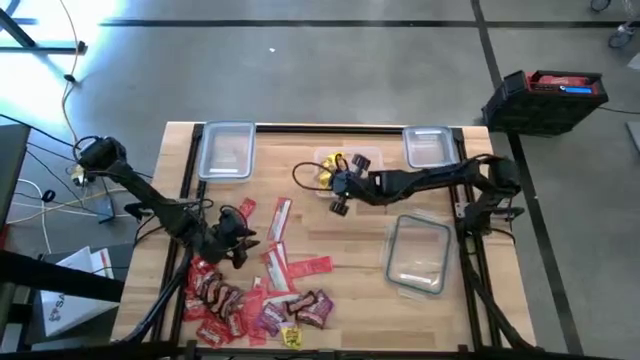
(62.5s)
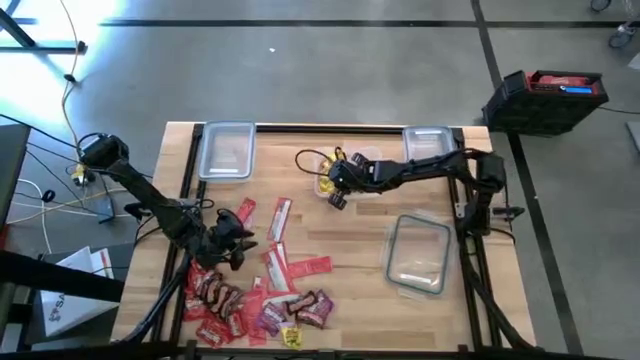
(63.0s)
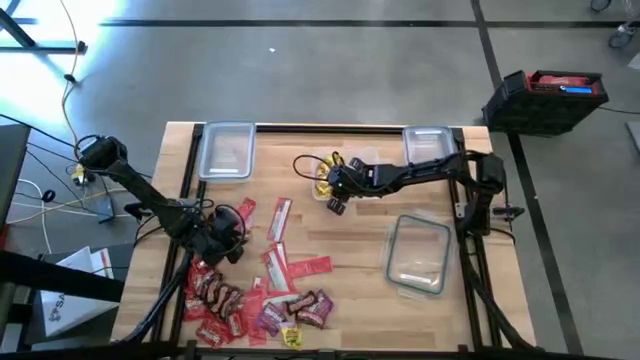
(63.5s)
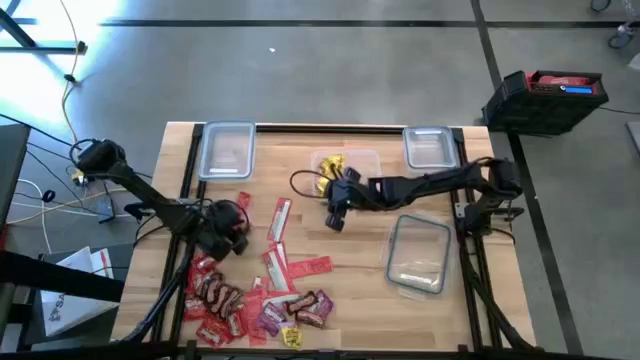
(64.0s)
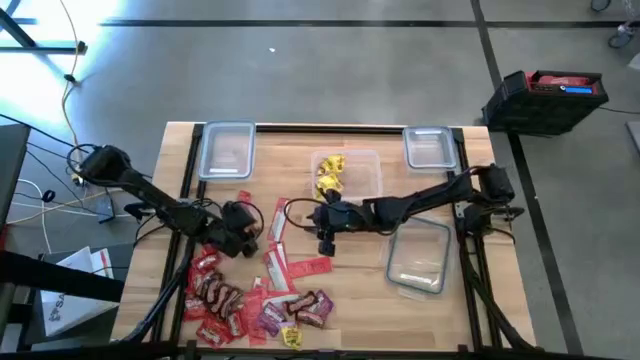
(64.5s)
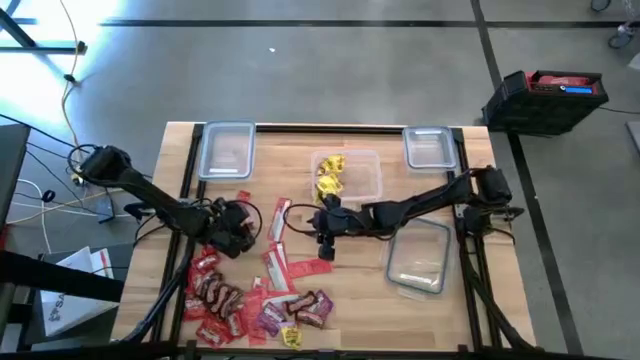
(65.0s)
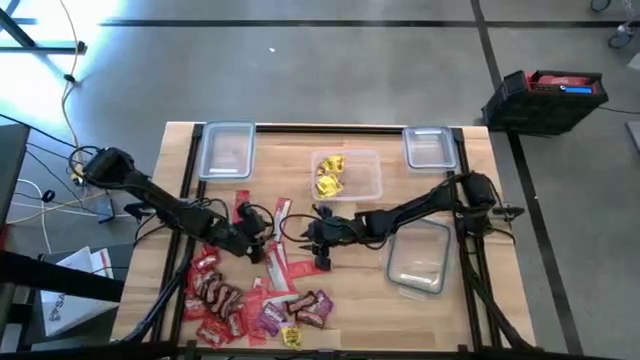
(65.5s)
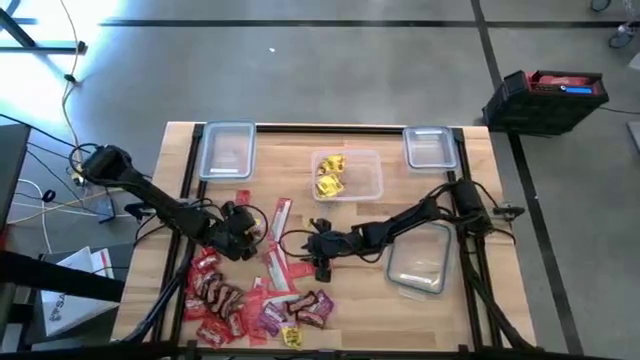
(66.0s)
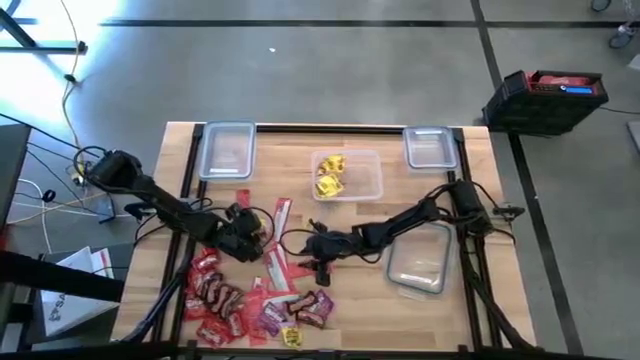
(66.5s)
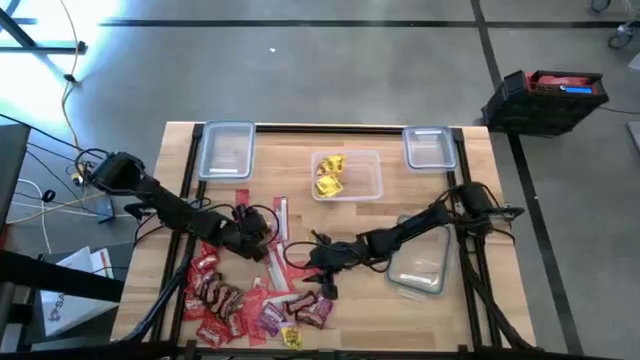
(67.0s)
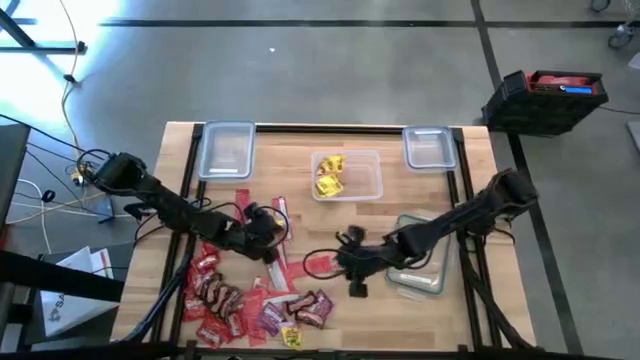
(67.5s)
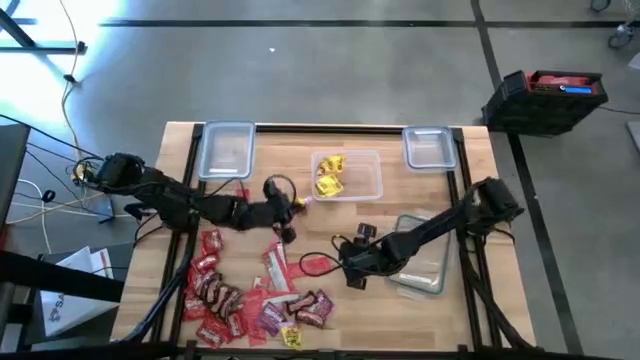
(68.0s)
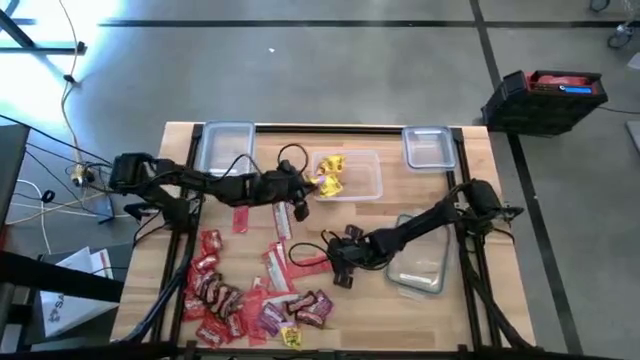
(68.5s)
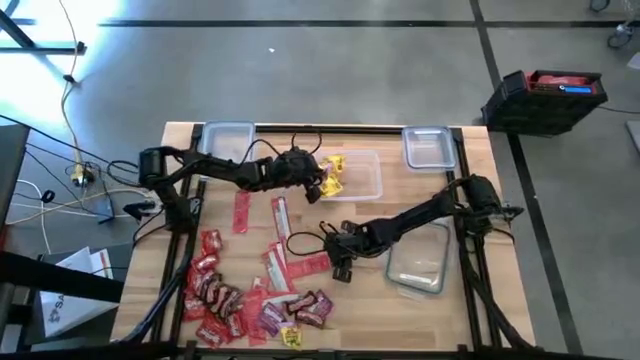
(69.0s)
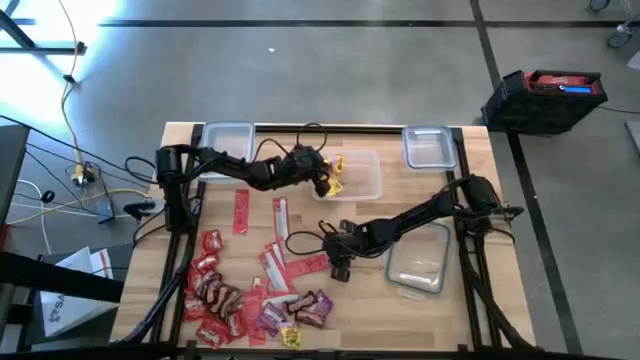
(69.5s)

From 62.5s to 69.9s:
Task: Sort candy
Put the middle left yellow candy into the center transparent bin

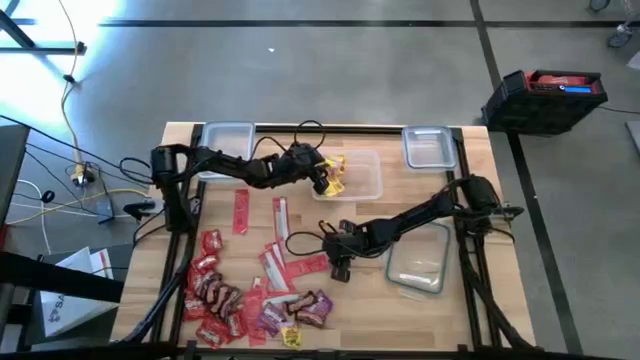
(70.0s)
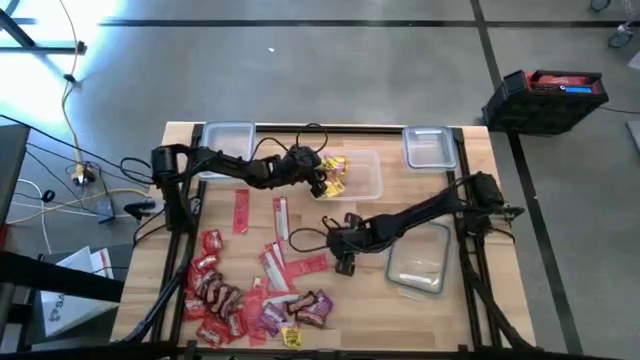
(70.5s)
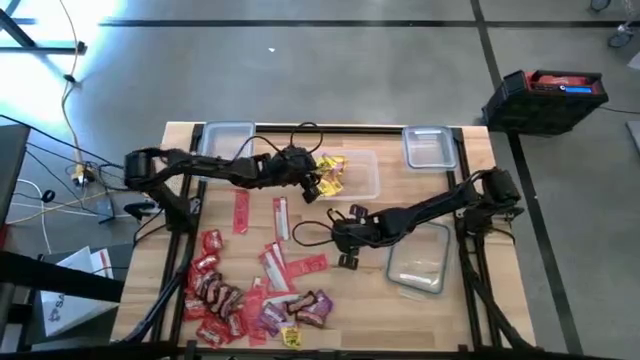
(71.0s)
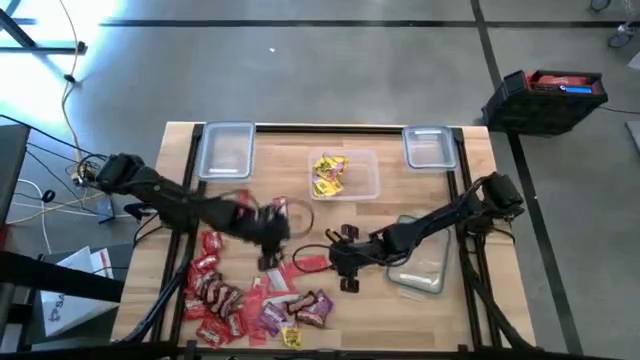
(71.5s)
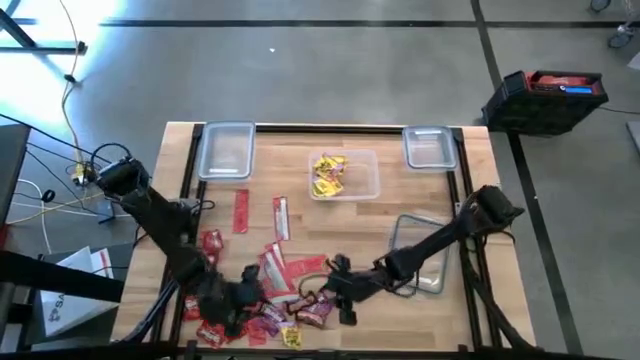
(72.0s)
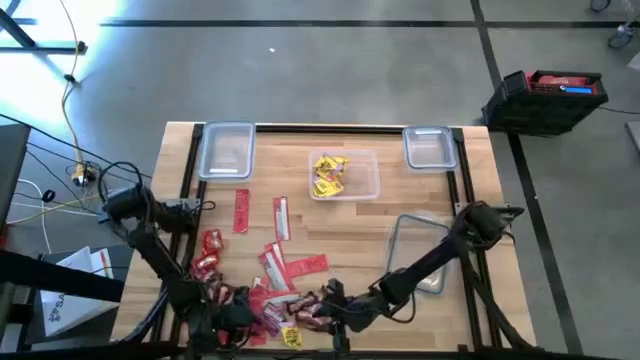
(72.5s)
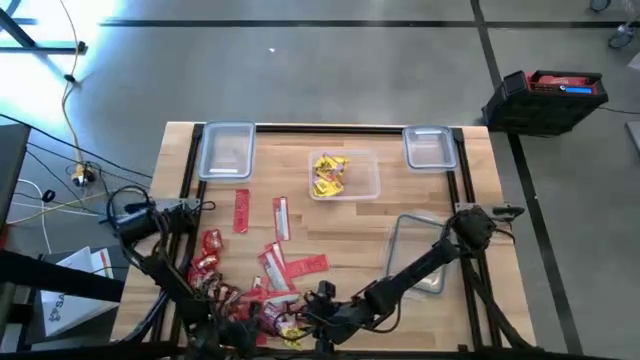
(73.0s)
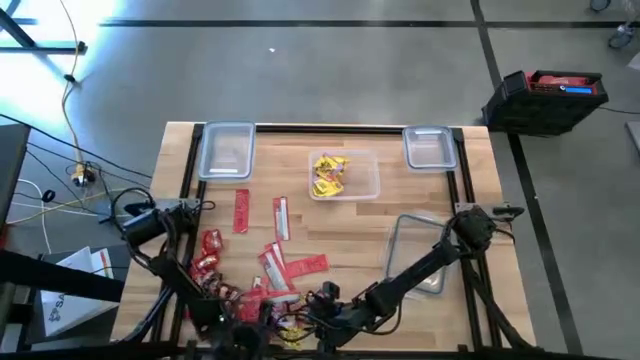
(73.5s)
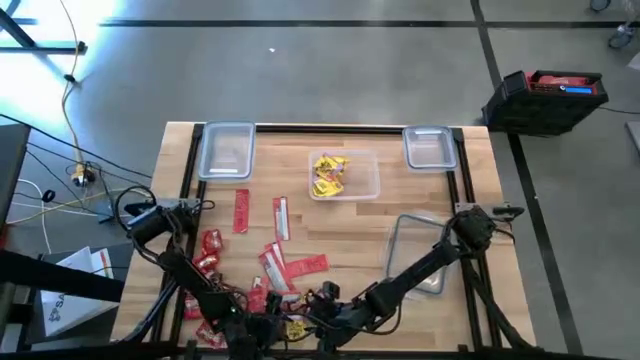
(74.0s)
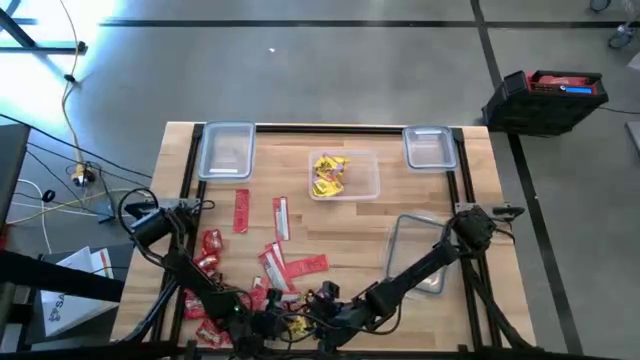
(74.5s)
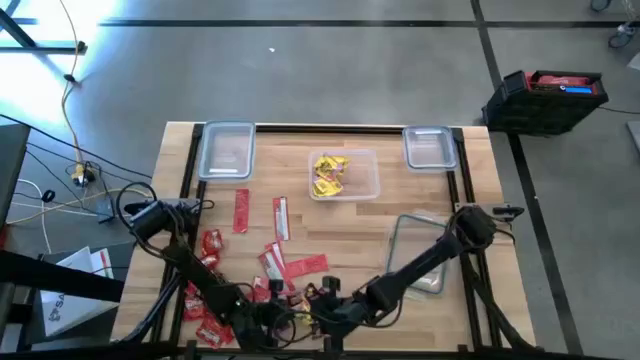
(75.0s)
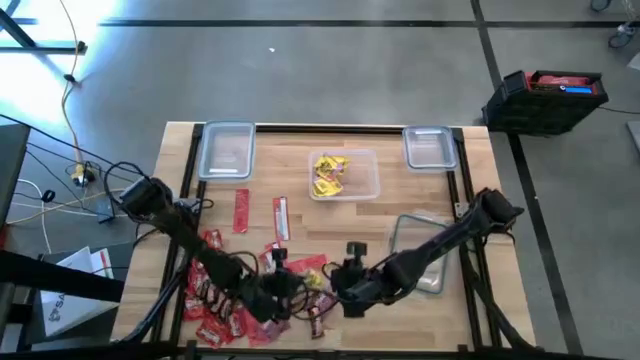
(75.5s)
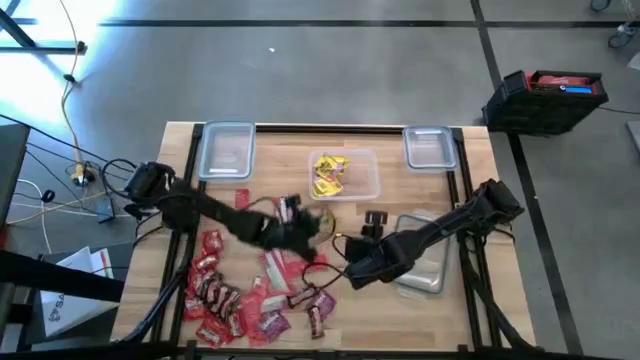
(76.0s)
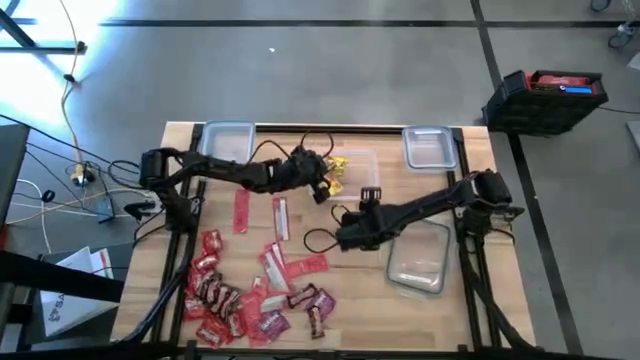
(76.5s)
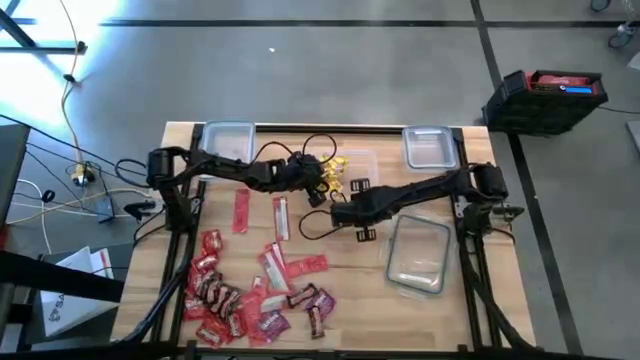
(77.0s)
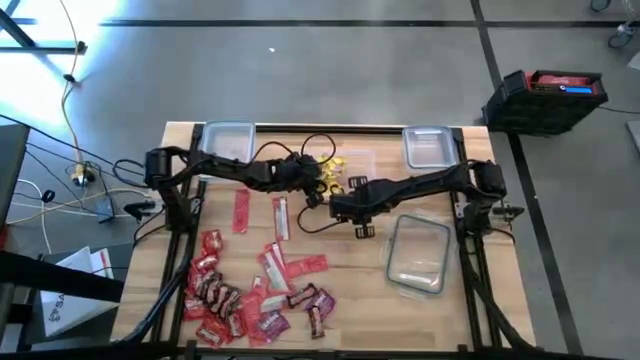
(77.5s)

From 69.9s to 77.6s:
Put the yellow candy into the center transparent bin

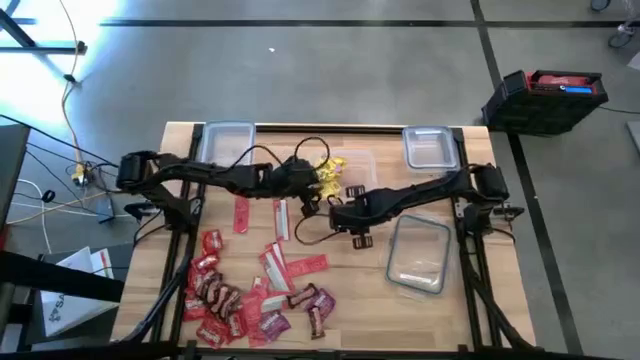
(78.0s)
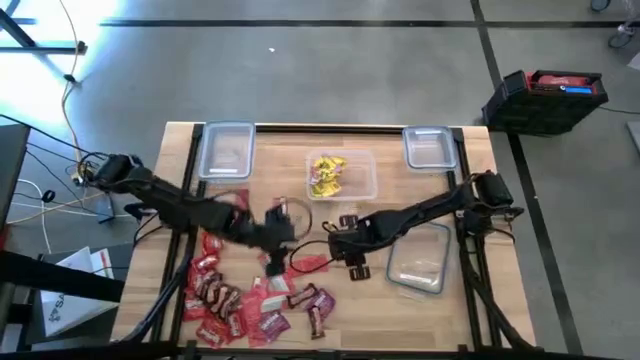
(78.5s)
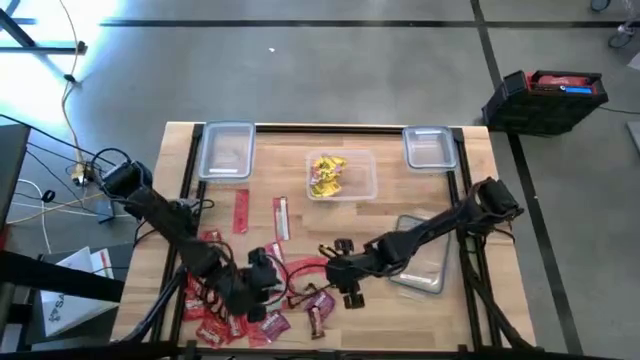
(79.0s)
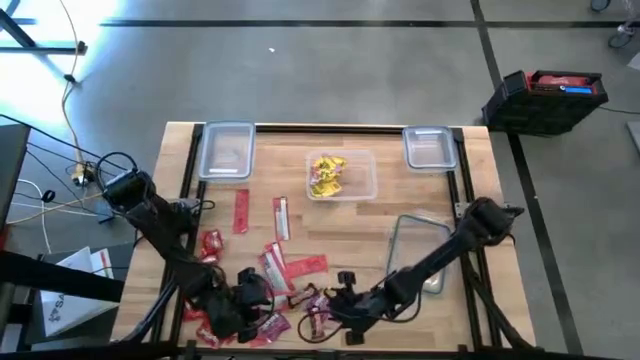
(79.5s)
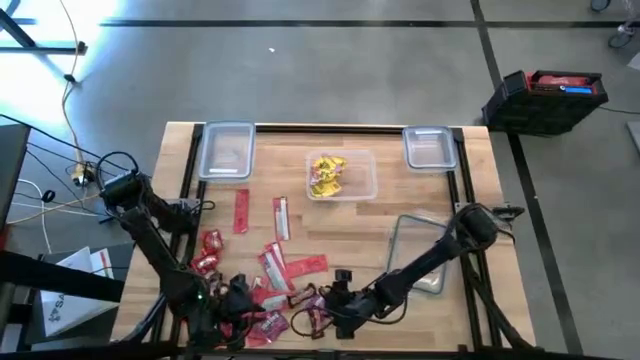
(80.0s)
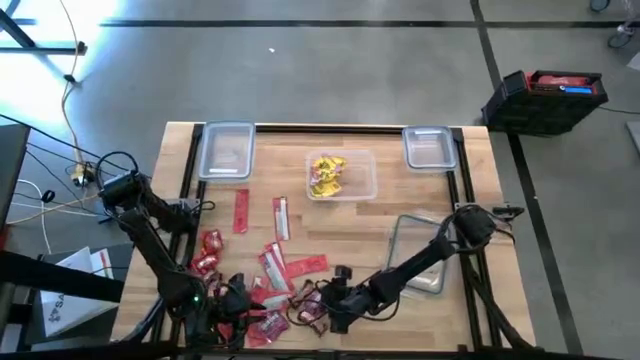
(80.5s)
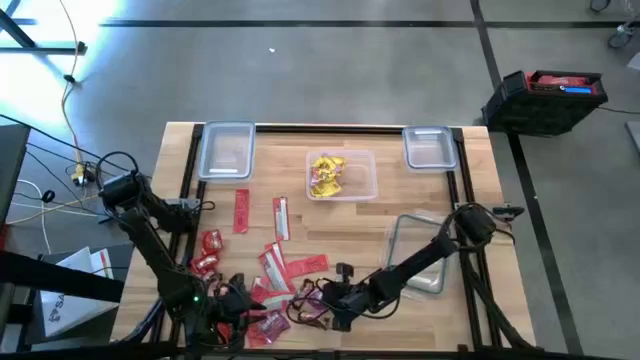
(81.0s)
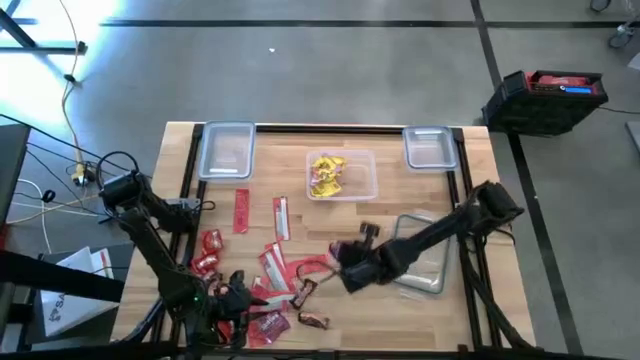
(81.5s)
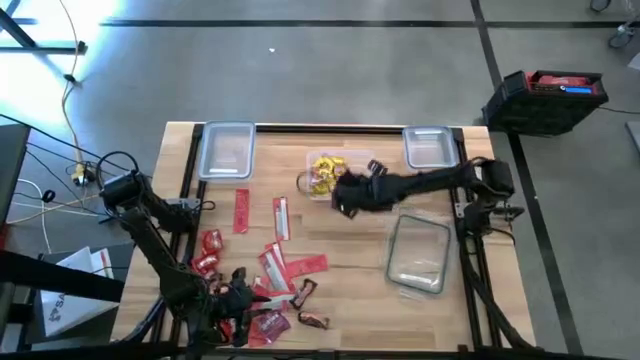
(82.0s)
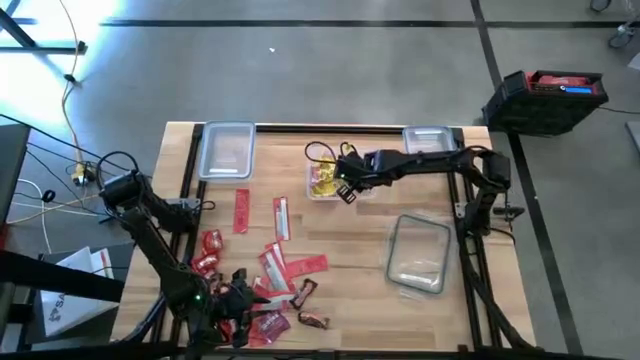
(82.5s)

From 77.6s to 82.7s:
Put the violet candy into the center transparent bin

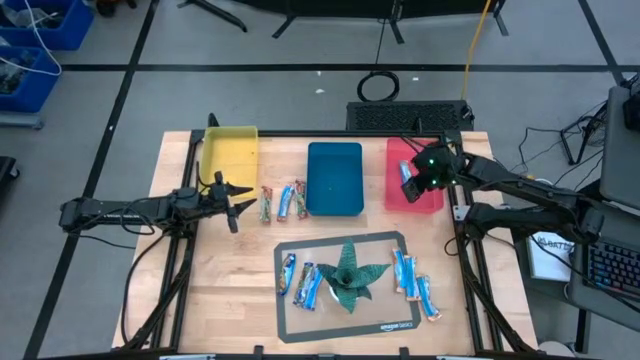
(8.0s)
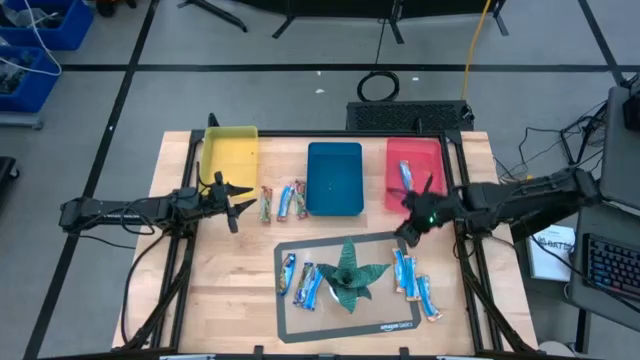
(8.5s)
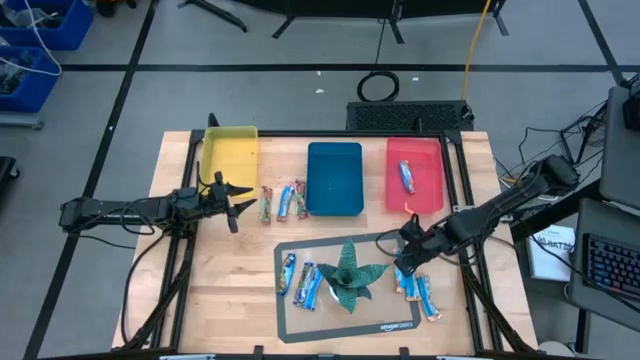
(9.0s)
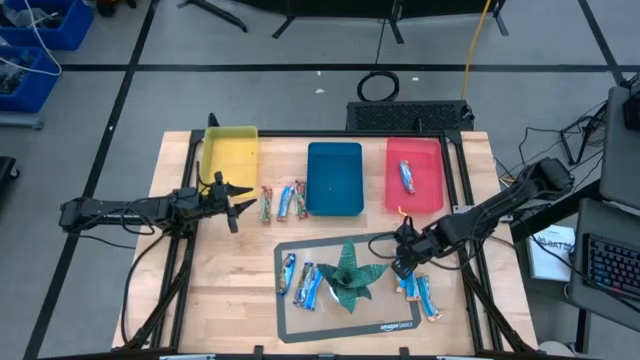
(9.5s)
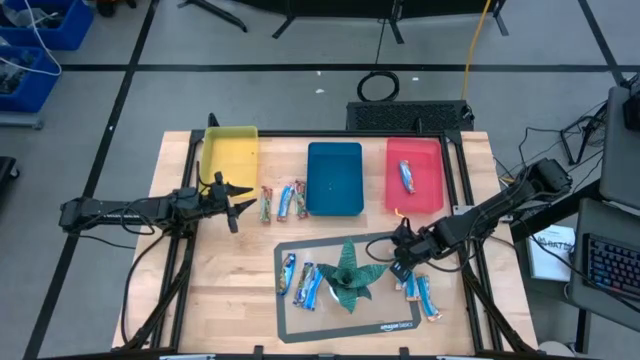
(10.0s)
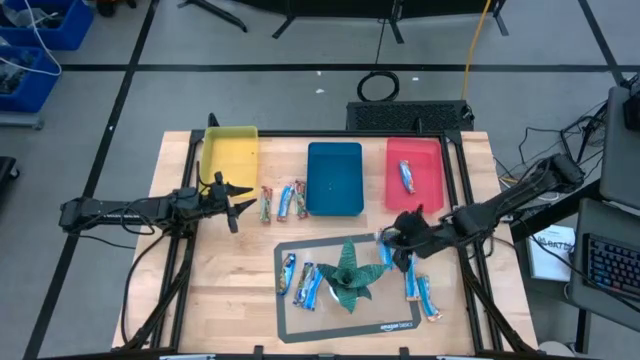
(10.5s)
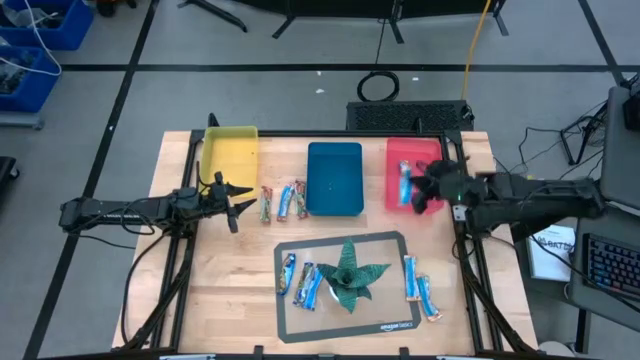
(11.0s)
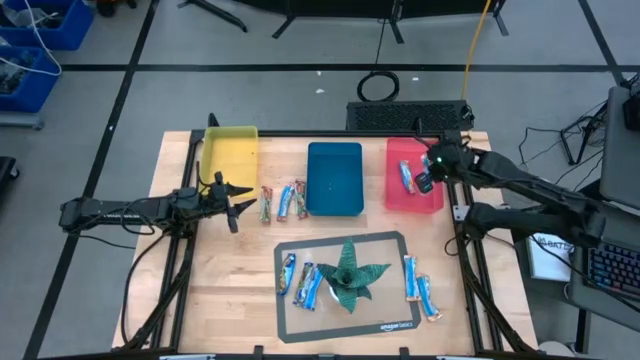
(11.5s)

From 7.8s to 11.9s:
Task: Pick and place Granola Bars by type
Put the yellow granola bar into the pink bin
